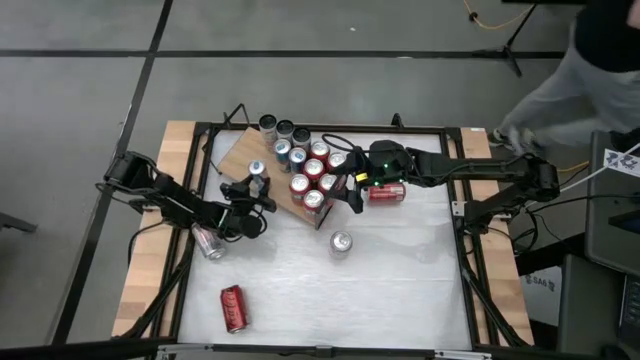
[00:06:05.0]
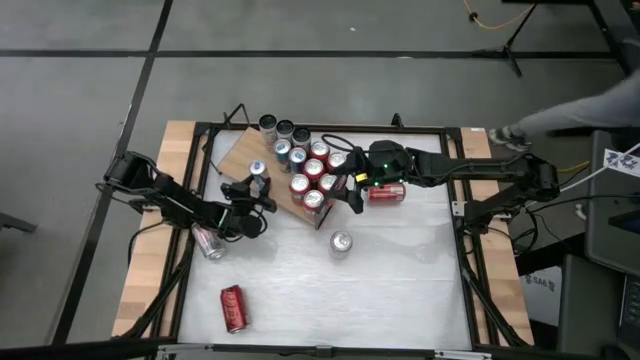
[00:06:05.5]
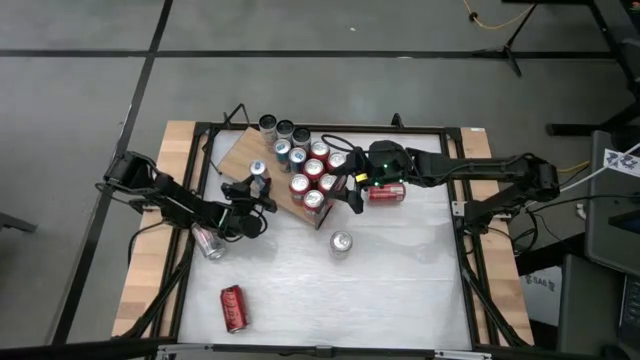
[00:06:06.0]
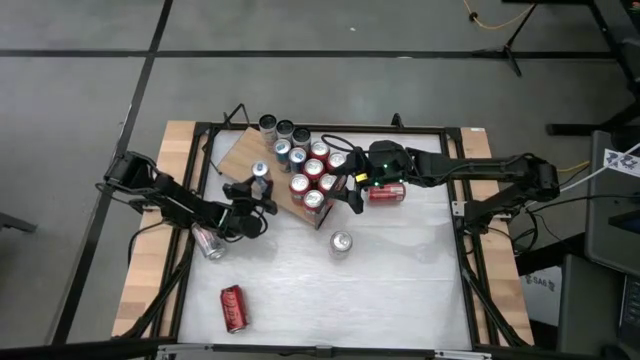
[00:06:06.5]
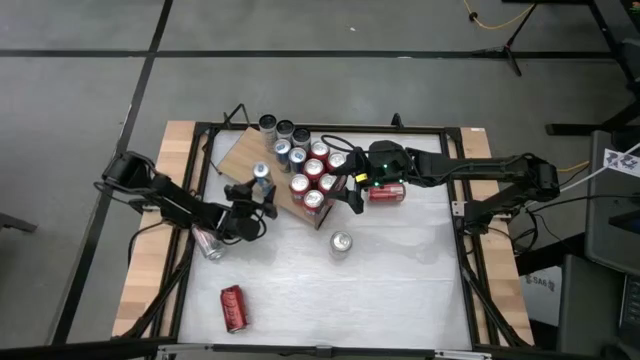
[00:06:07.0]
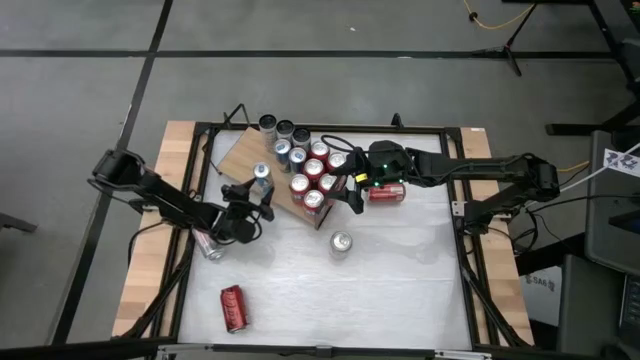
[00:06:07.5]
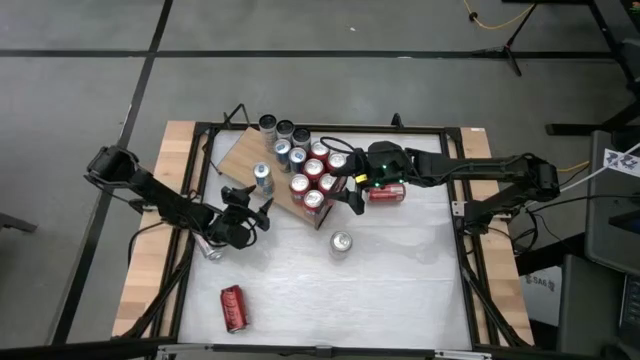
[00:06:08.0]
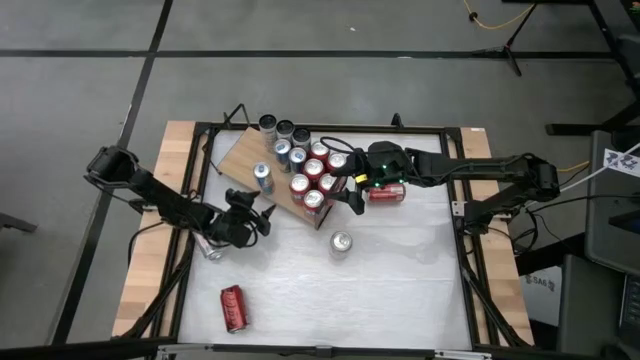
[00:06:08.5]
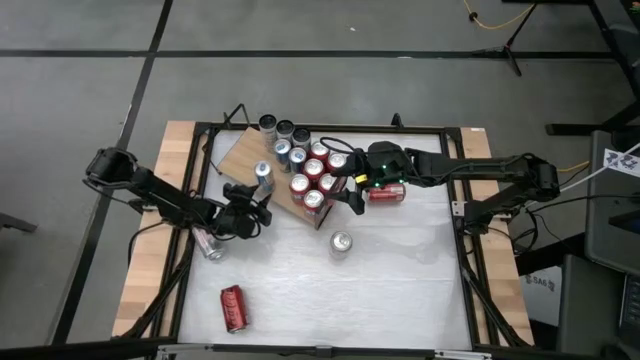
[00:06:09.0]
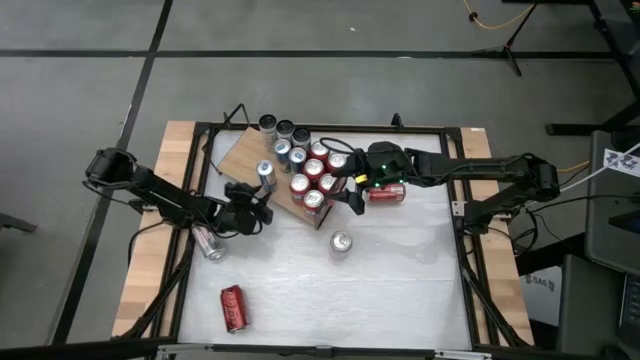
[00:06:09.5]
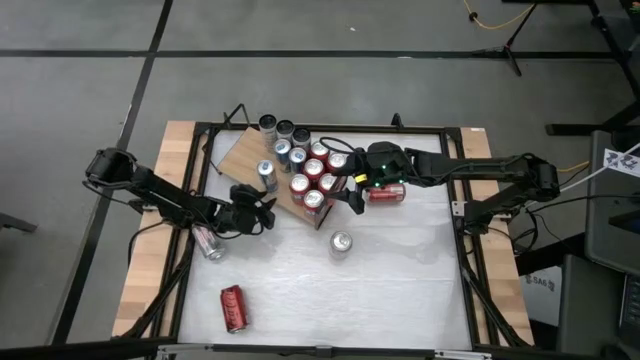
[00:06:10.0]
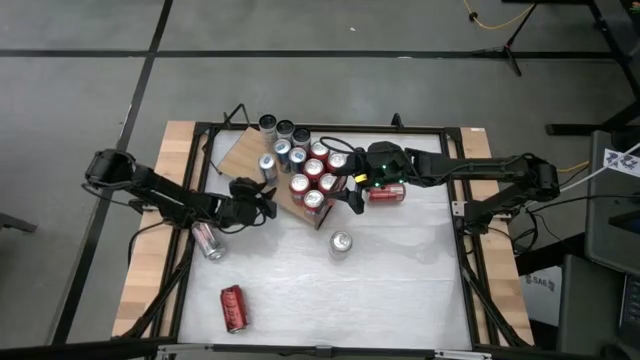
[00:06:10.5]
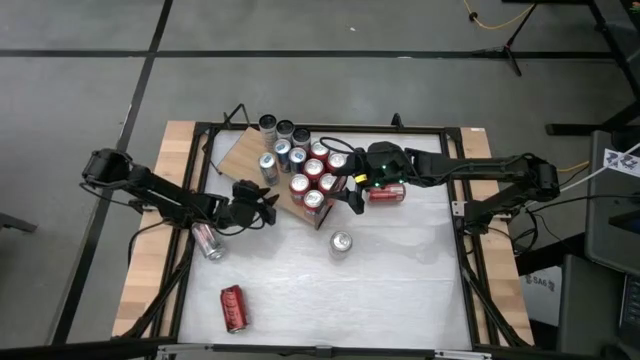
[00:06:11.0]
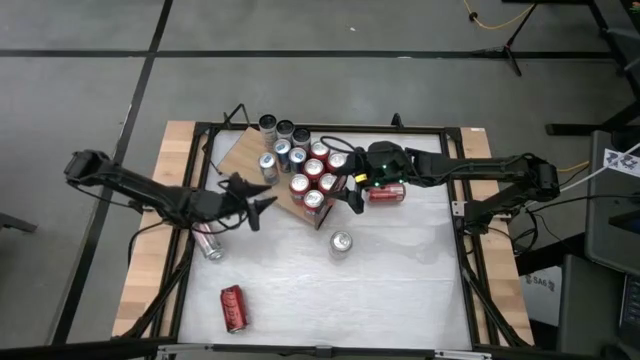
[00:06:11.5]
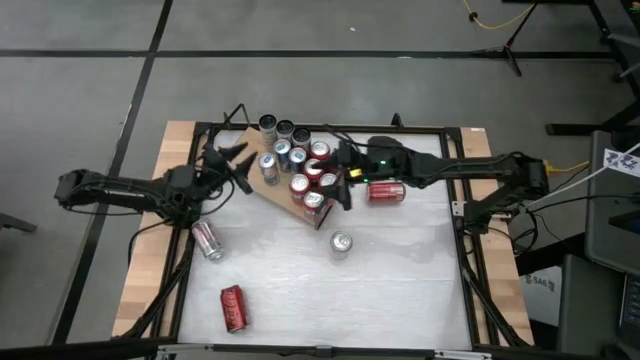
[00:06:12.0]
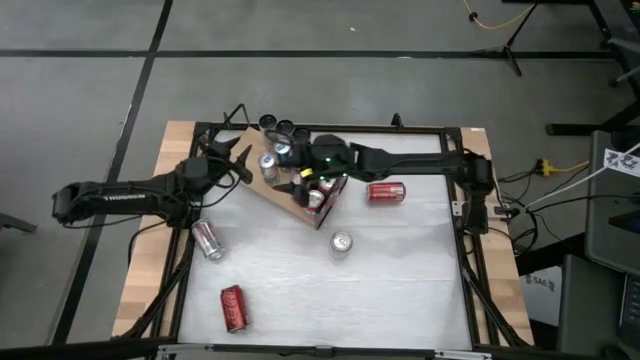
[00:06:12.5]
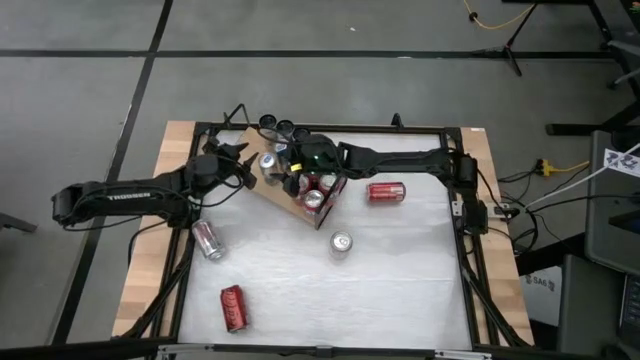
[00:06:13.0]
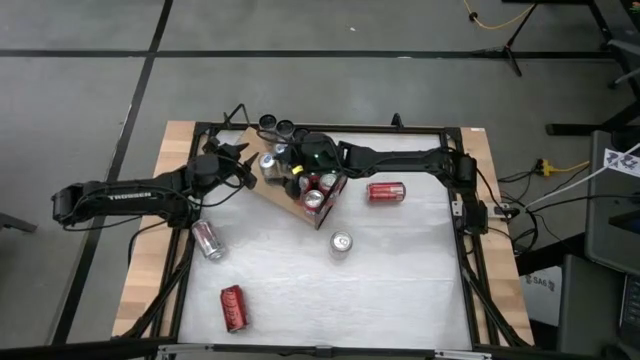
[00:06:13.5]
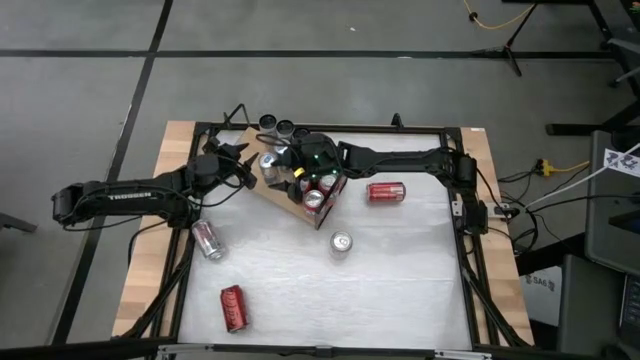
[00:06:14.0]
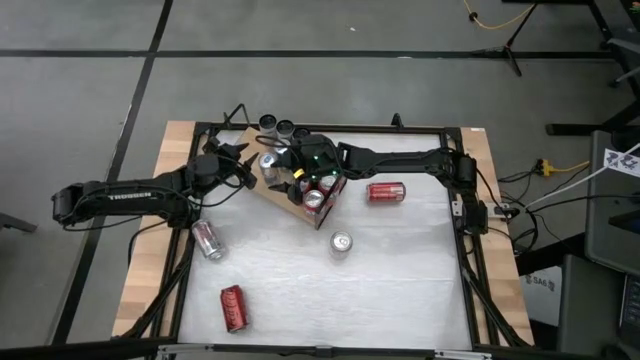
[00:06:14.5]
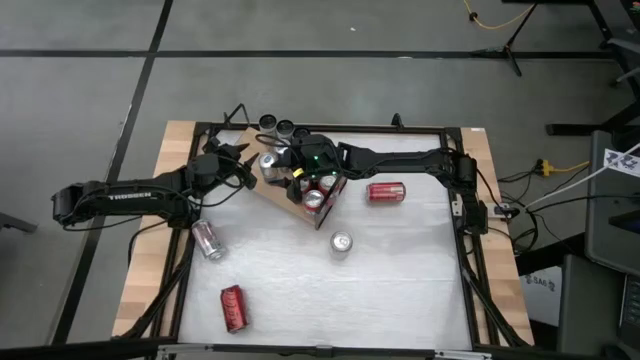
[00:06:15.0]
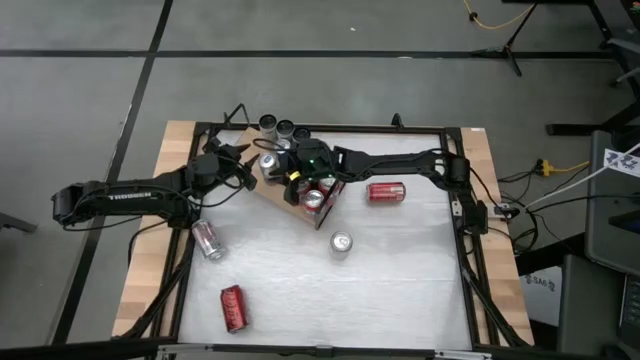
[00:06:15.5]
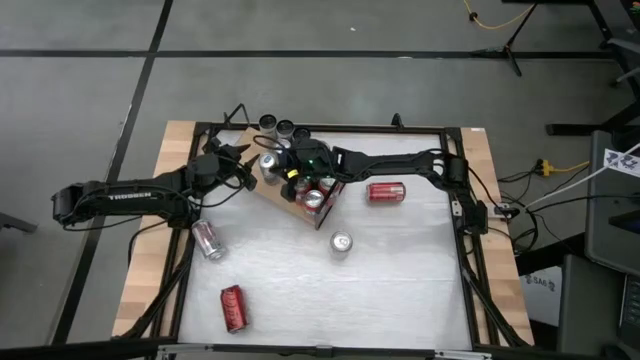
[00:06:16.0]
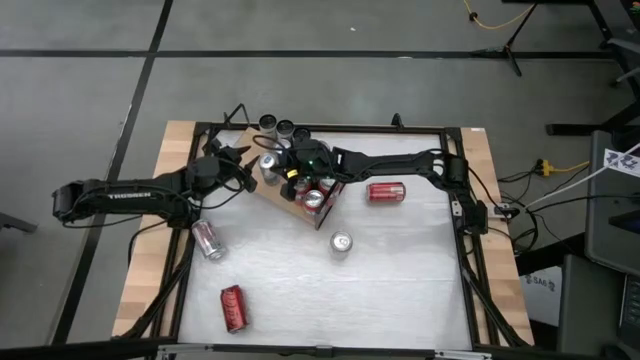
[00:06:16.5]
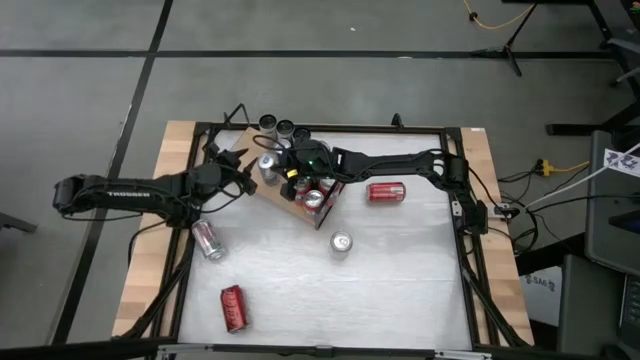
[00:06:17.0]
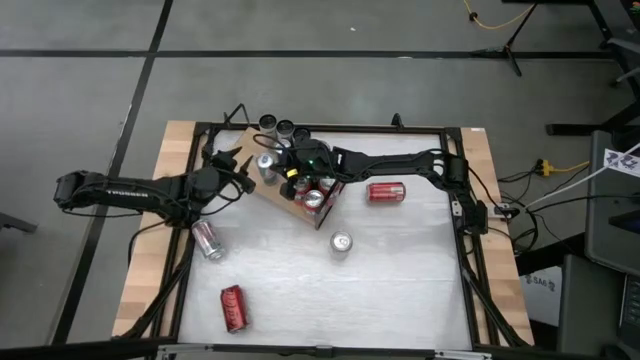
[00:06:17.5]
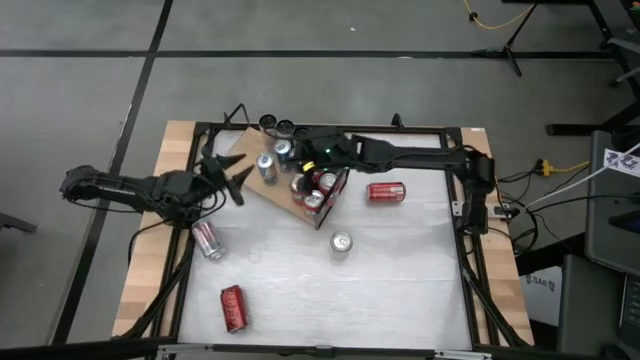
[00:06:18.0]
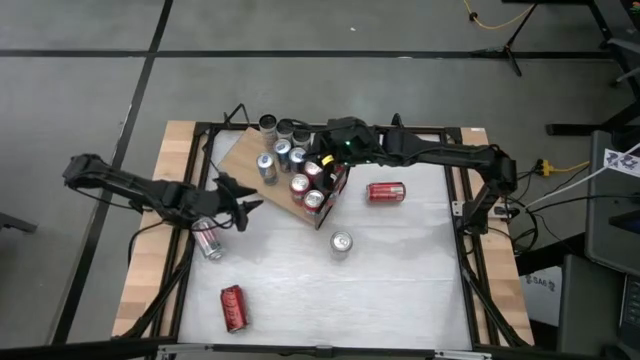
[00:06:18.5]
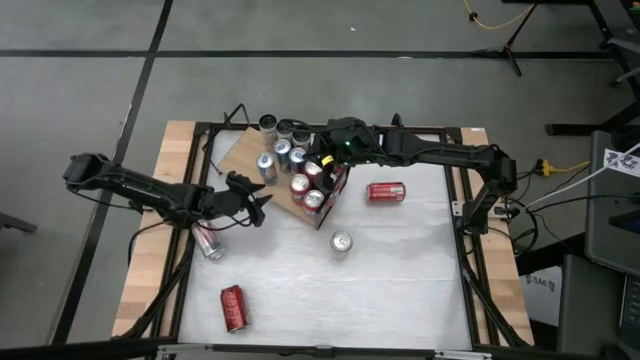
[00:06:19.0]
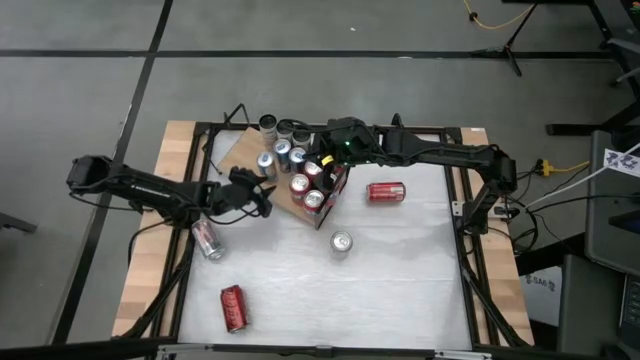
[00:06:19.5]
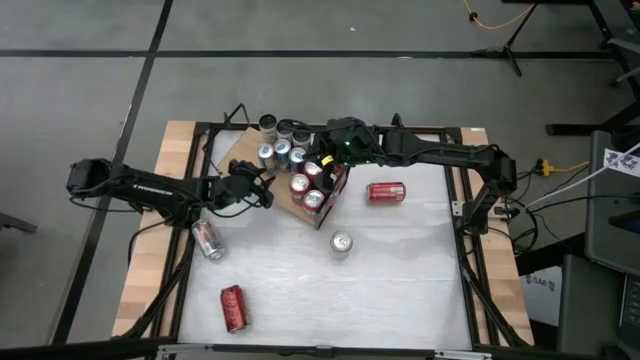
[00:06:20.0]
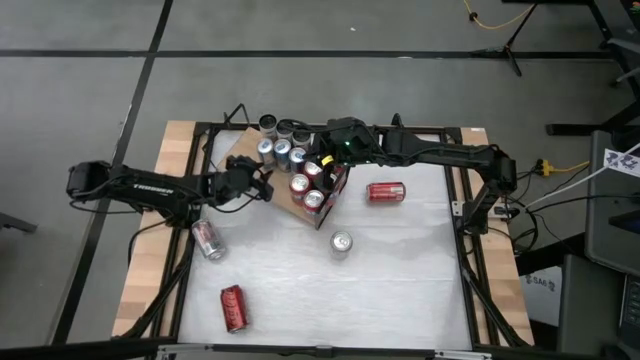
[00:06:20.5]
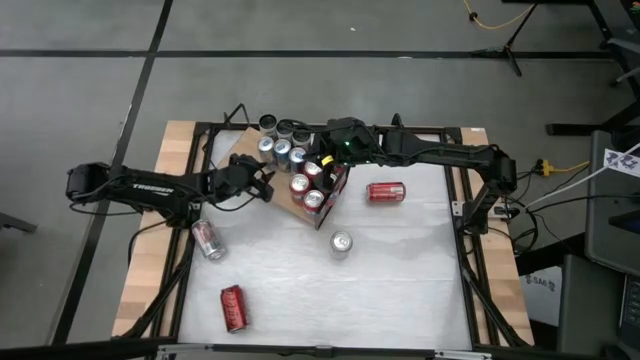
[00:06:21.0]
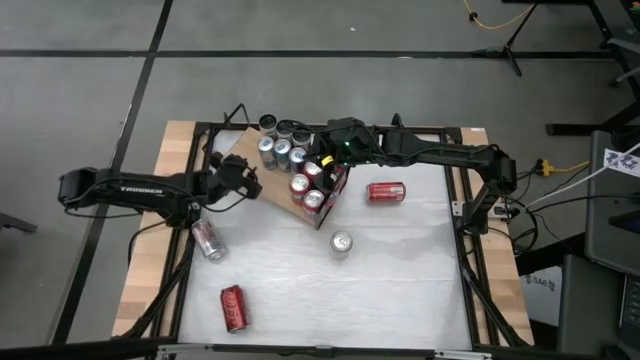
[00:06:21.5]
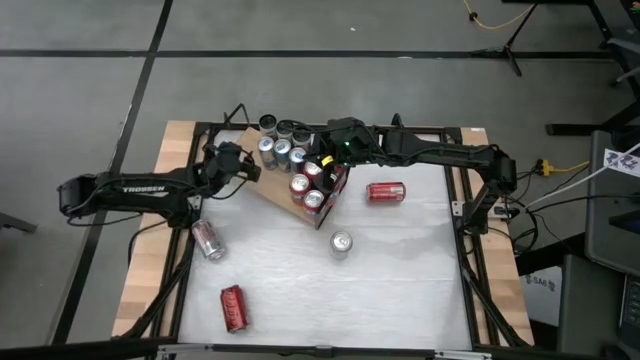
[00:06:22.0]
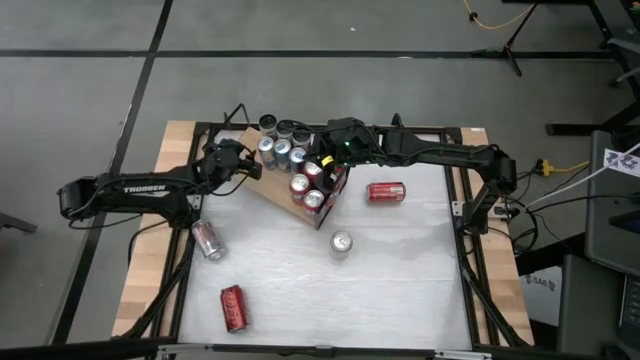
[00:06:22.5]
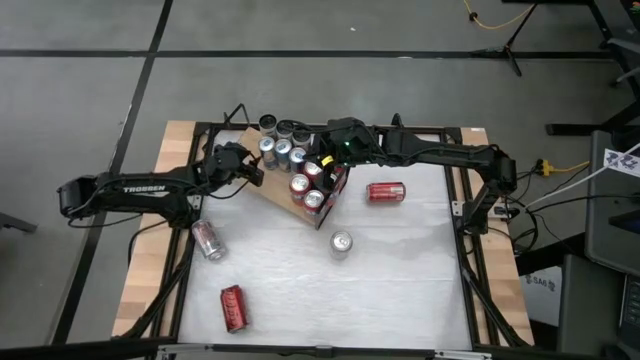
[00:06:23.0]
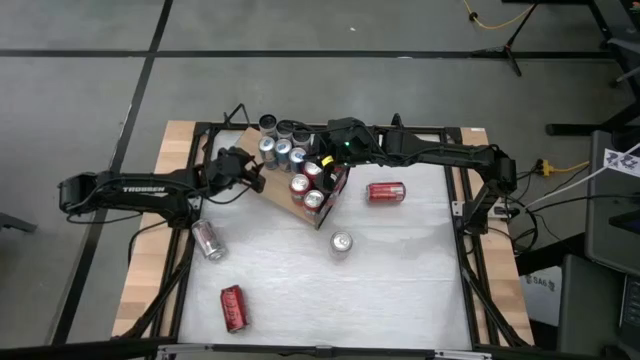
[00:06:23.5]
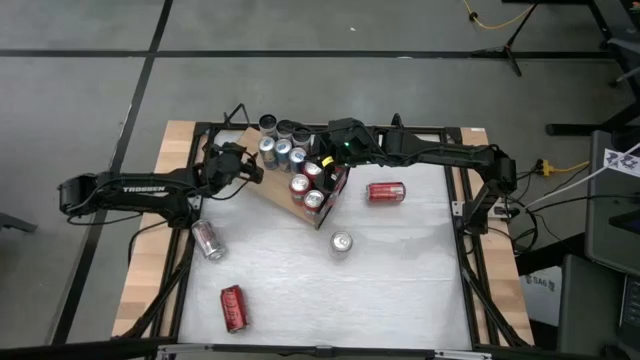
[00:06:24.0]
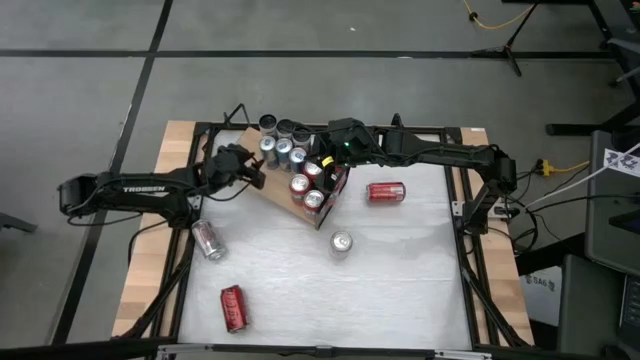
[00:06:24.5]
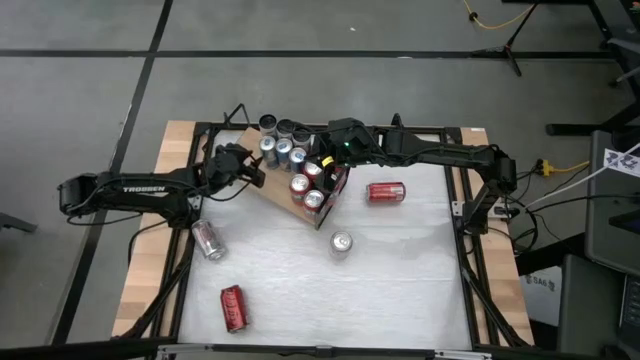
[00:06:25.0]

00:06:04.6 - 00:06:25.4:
Task: Pick and place cans onto a shelf
Put the blue and white soda can on the shelf aligned with the other blue and white soda cans
